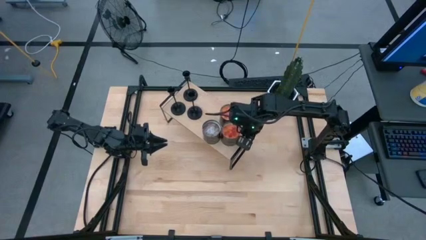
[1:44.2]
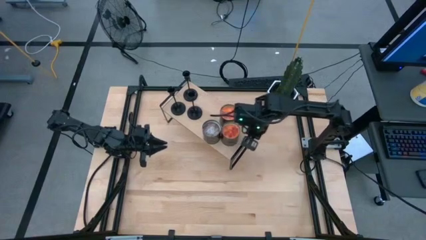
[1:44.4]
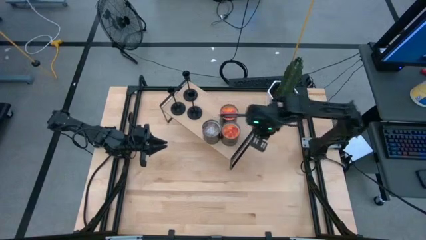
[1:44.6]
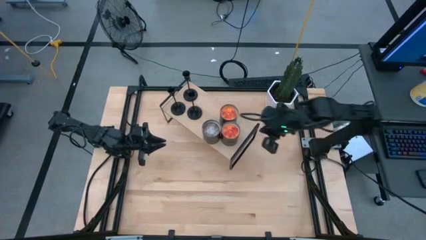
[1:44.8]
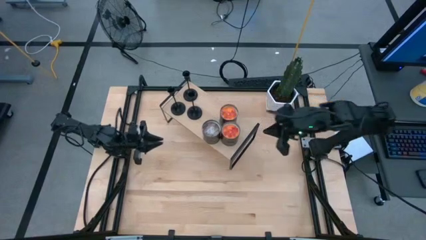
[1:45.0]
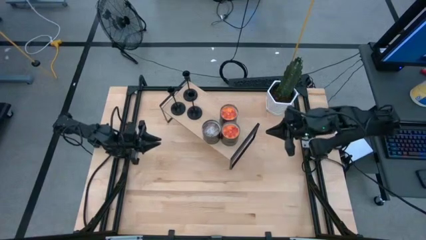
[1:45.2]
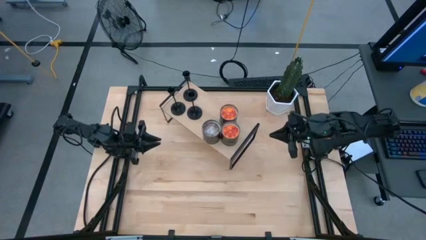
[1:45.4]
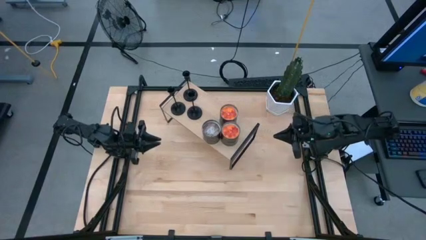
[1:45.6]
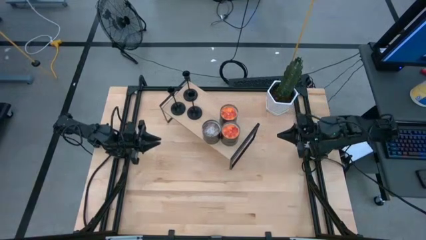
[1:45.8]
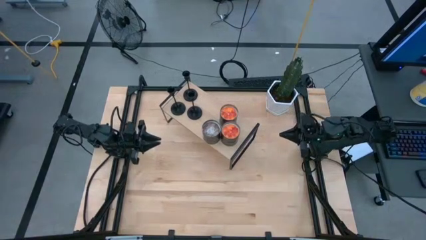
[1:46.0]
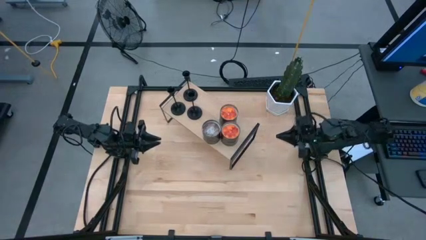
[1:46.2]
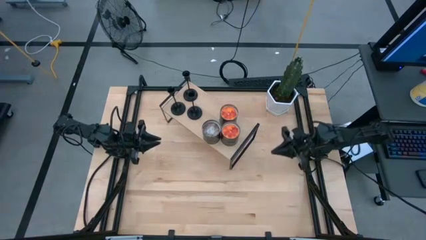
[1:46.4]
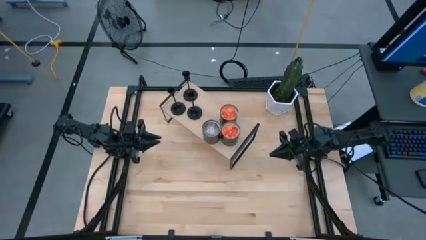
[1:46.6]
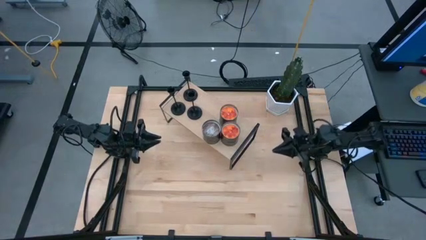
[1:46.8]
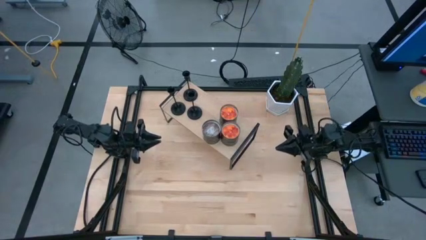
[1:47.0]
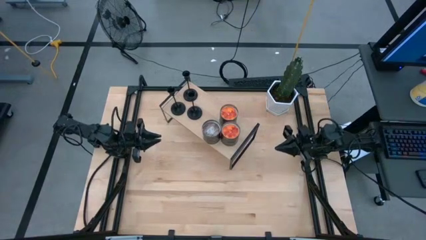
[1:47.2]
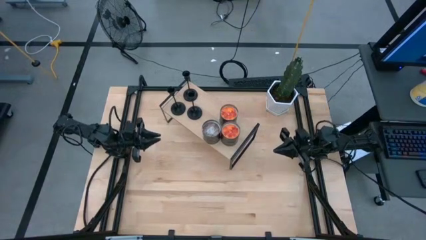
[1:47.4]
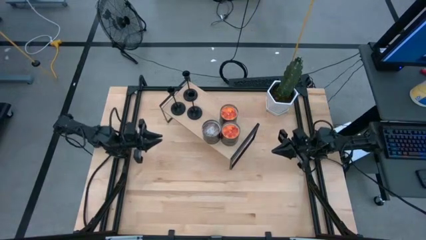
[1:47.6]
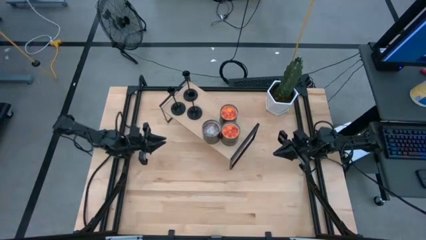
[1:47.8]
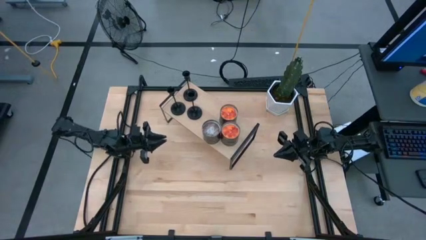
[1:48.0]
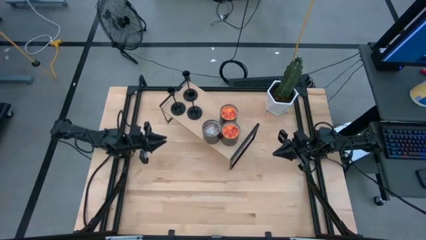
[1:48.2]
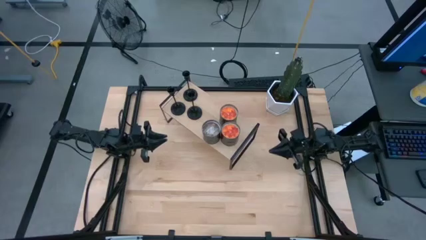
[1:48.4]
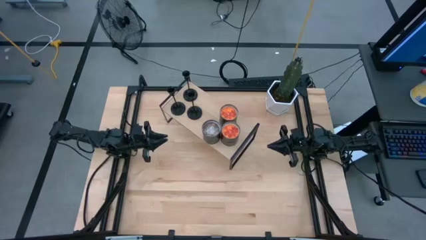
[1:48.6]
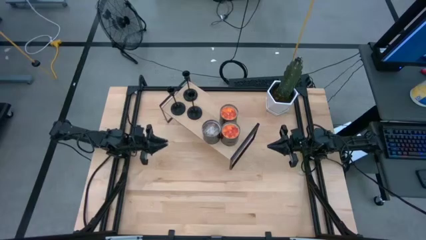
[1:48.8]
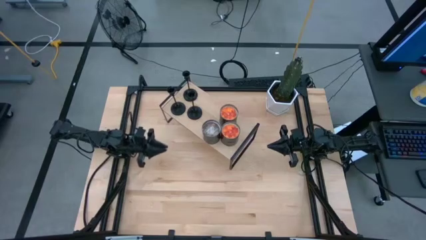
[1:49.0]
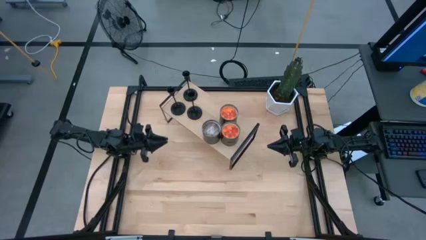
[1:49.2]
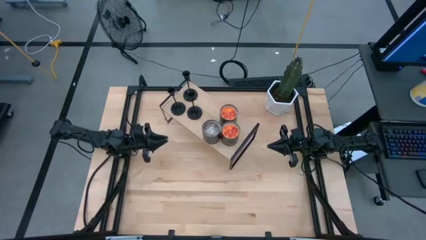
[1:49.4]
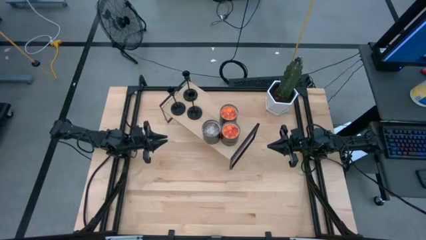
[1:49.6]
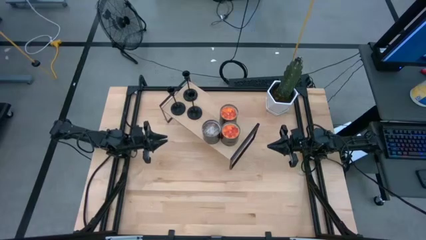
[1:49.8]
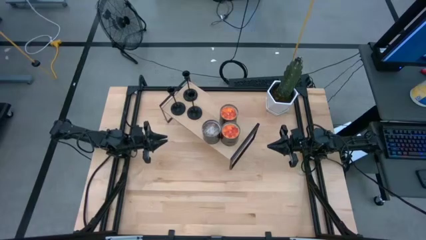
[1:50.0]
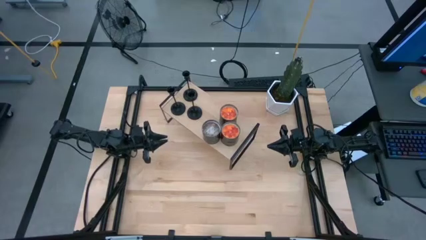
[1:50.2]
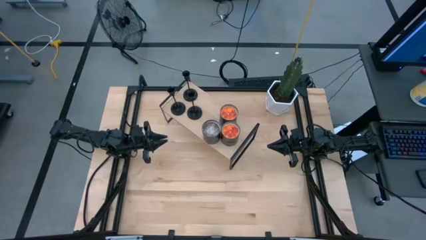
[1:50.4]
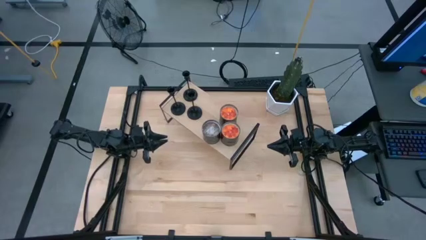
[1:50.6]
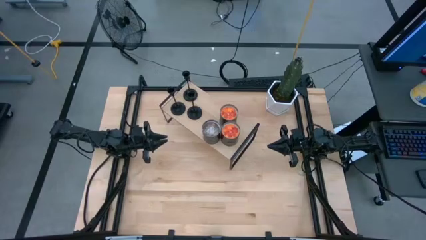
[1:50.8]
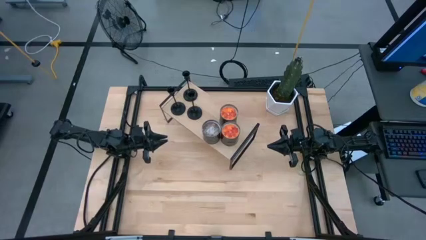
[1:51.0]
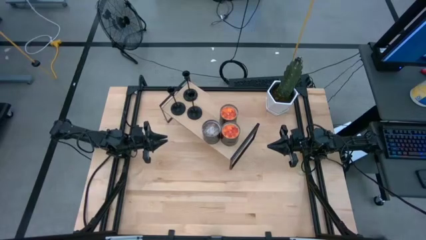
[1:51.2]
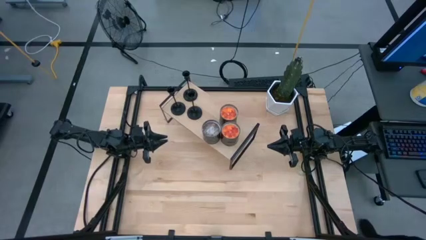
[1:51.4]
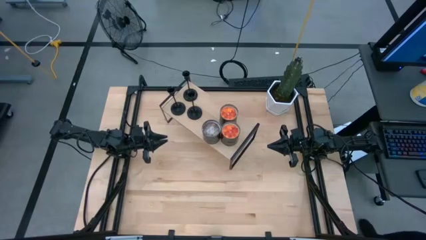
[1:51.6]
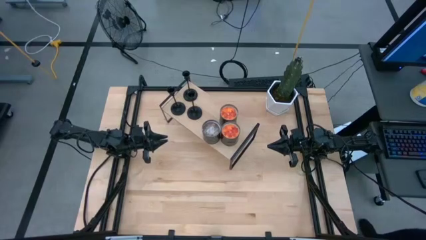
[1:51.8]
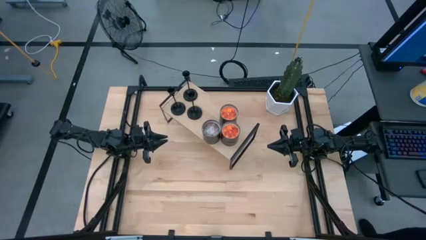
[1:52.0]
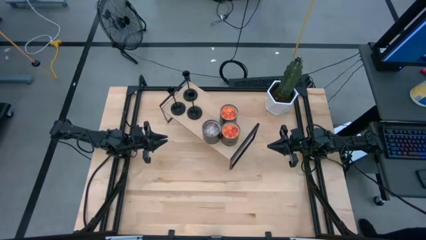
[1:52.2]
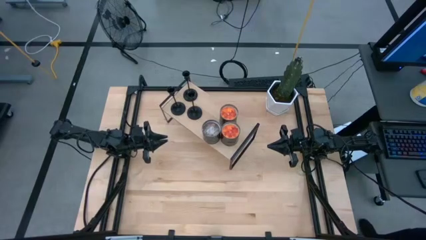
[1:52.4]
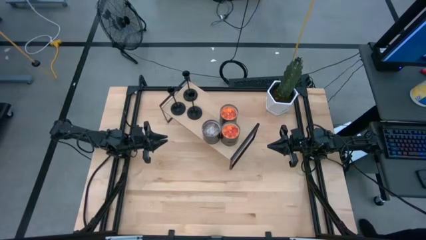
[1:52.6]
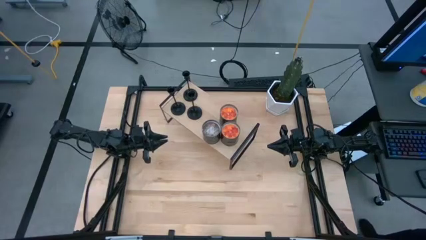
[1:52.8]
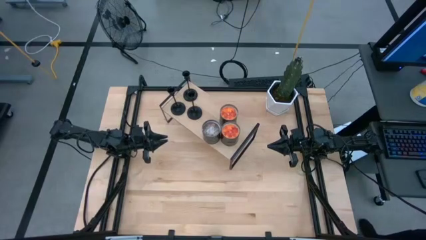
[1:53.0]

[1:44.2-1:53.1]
Task: Pick & Place candle stick holders
Return to Home Position

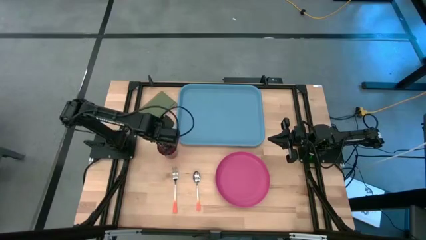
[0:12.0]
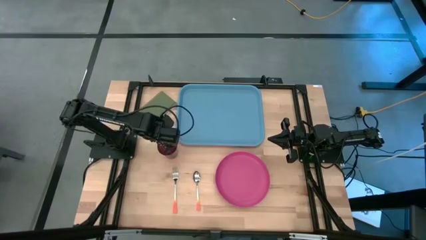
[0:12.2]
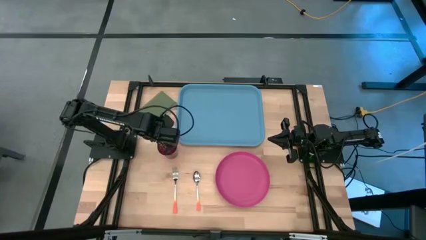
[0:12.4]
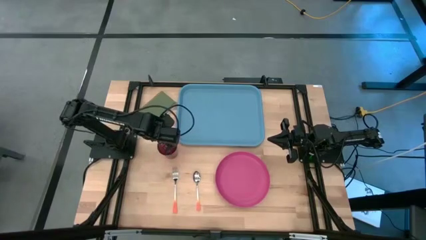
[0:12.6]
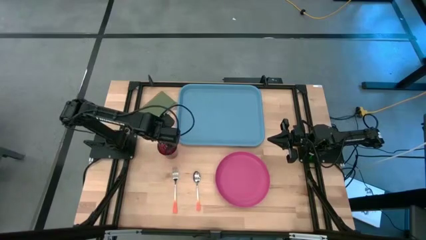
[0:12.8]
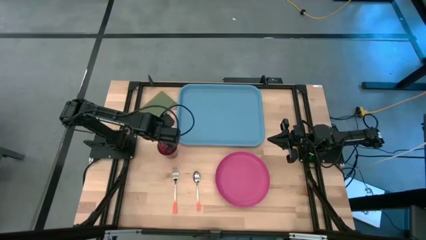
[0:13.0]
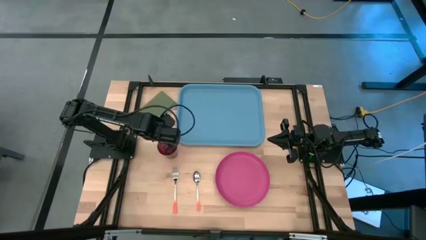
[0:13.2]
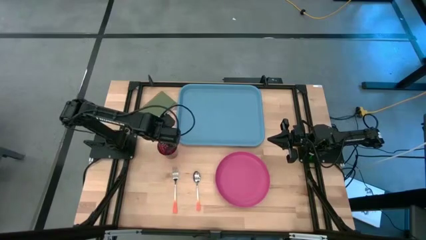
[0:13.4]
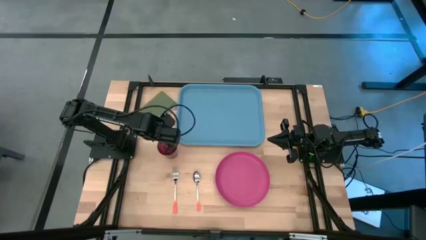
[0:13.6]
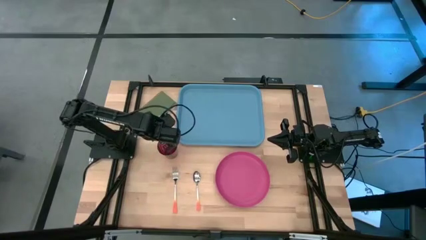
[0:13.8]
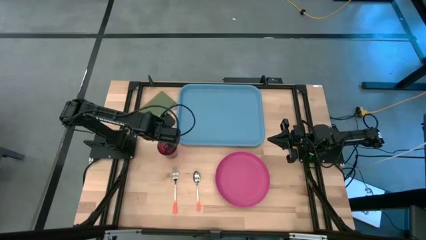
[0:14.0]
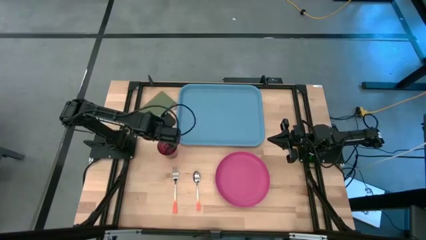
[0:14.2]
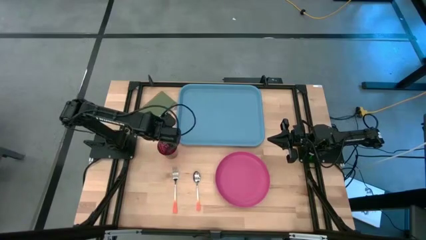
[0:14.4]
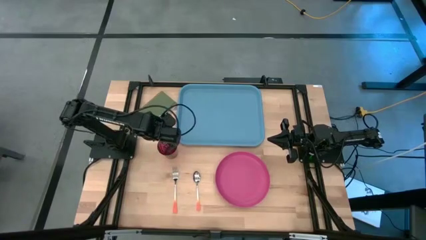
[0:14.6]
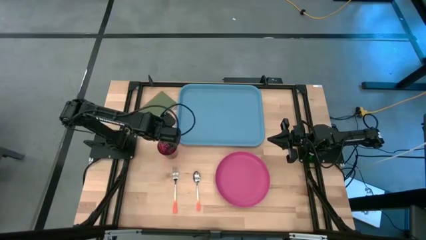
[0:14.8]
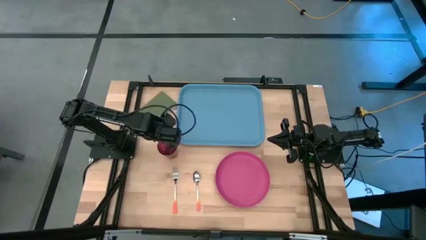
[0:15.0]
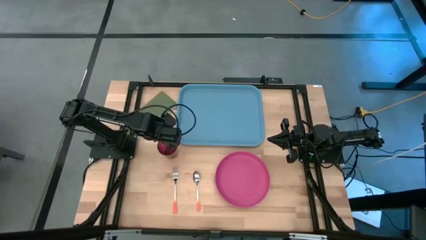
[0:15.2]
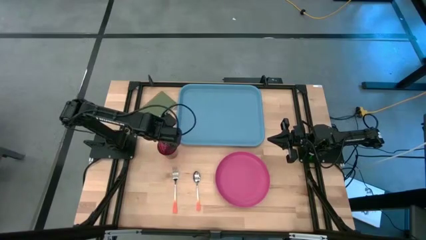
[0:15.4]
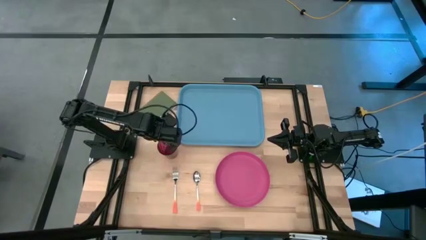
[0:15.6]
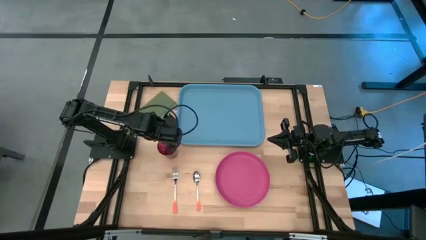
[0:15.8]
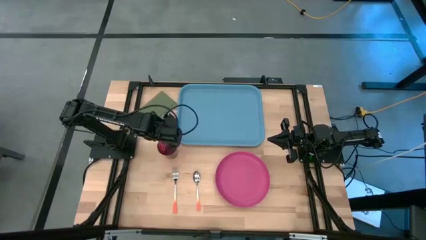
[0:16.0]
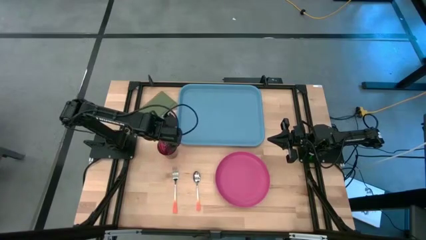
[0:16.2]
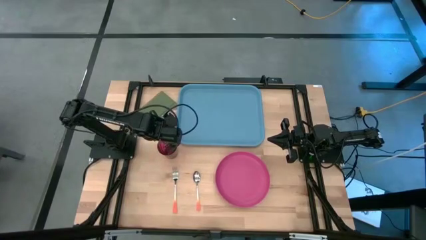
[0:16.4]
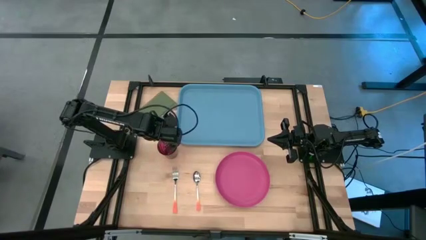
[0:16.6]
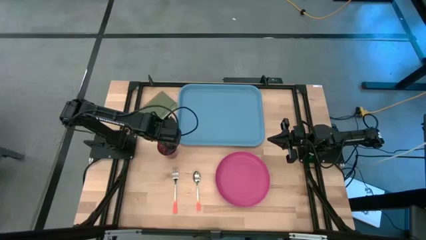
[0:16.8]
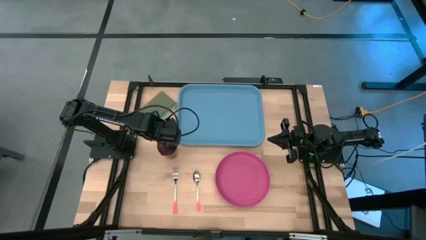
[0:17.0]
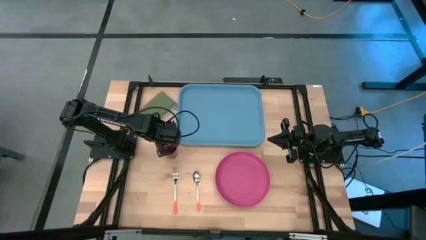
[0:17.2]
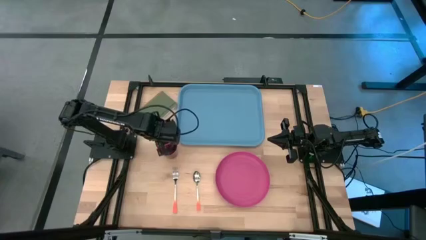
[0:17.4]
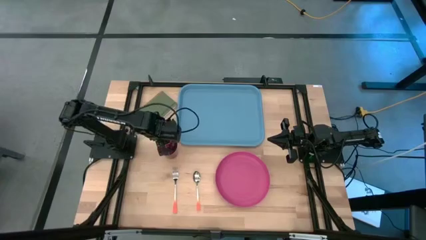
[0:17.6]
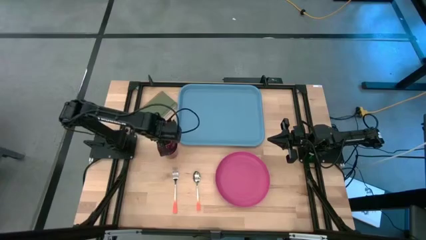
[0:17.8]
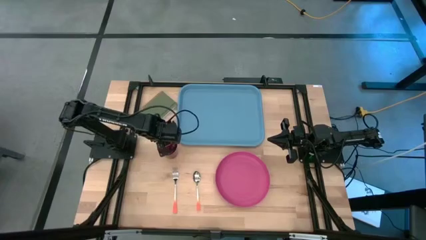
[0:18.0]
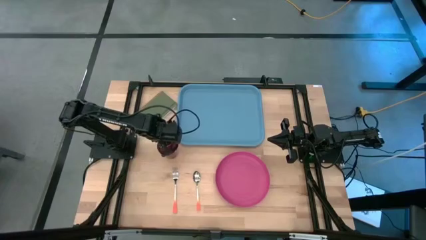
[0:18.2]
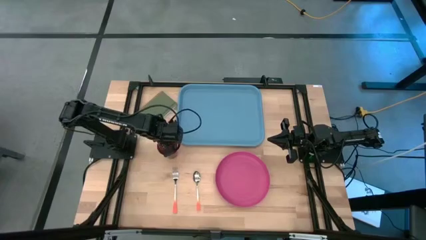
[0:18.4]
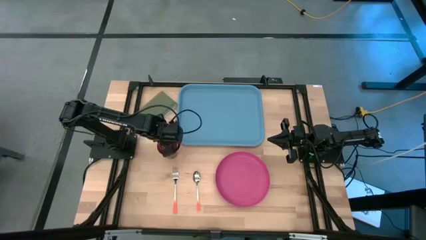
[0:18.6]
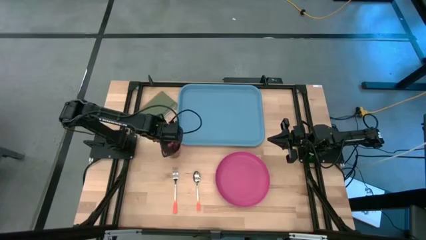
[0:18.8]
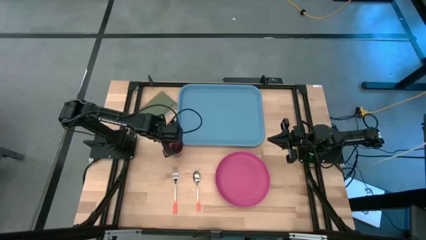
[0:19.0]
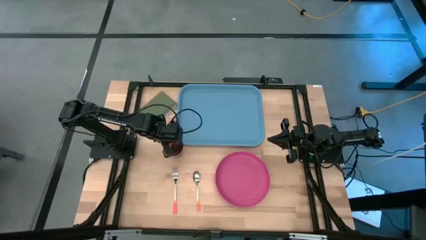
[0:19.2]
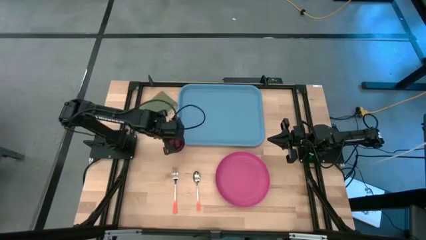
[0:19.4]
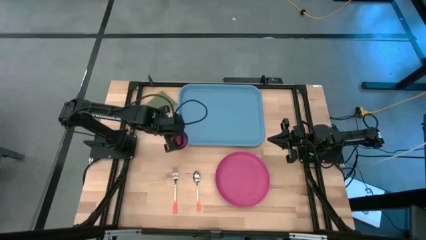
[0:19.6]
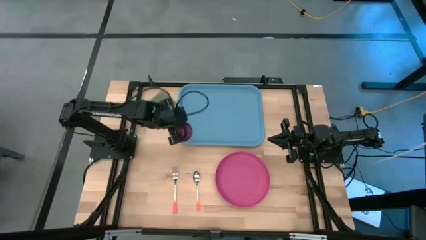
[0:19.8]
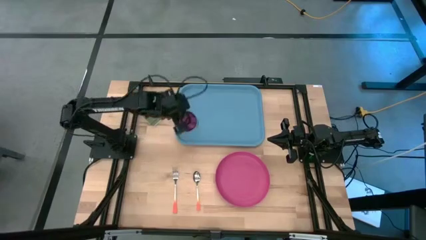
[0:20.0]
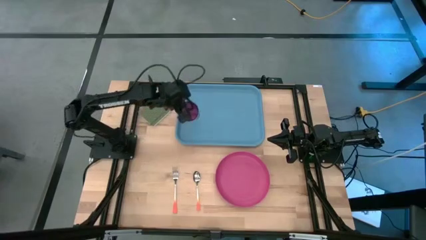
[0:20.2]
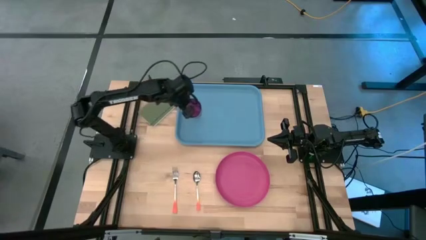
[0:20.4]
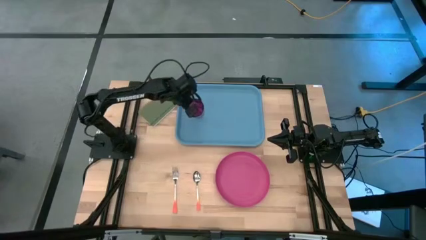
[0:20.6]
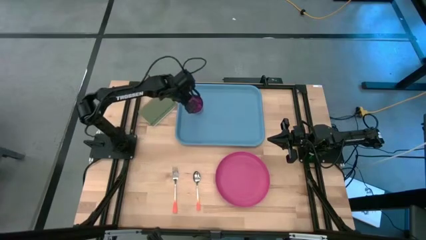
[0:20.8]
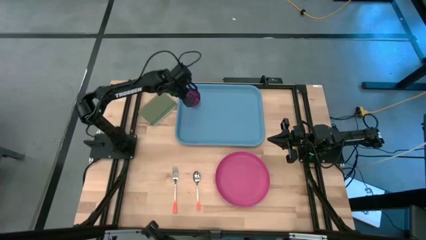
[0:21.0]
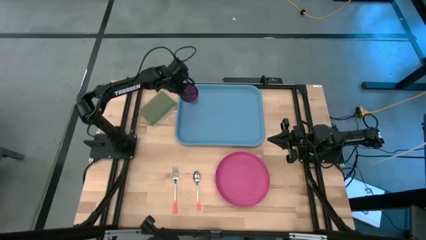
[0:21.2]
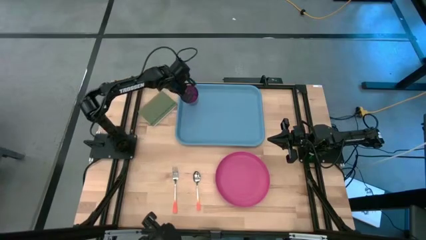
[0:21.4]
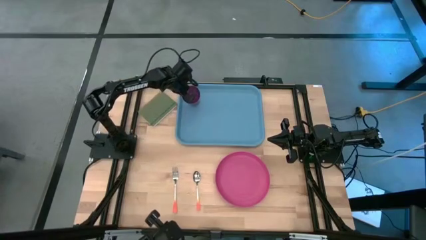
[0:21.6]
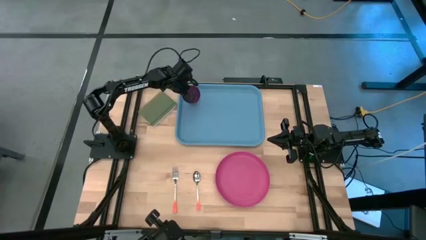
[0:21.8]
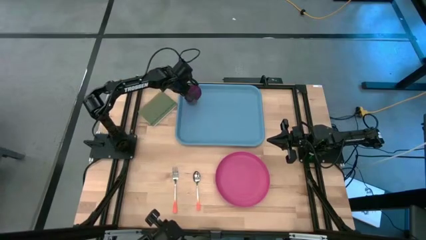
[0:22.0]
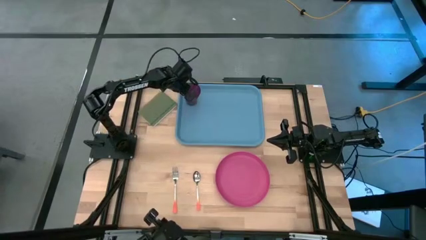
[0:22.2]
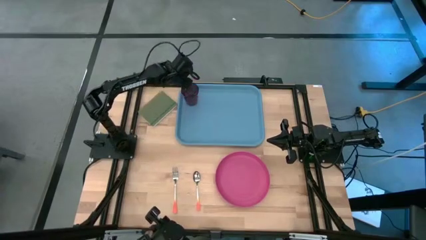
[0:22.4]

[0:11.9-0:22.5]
Task: Pick and place plate/cup/fork/spoon on tray
Put the purple cup on the top left of the blue tray
